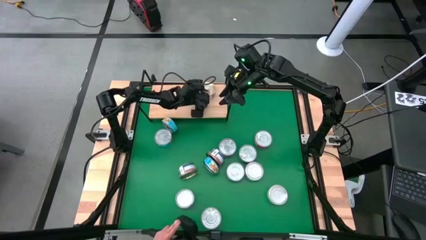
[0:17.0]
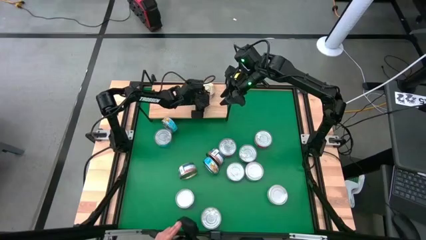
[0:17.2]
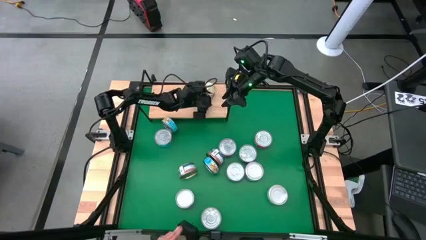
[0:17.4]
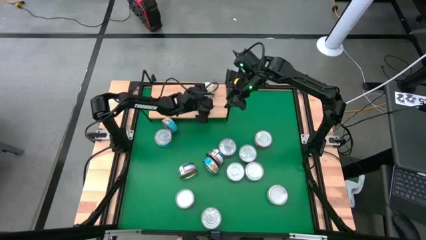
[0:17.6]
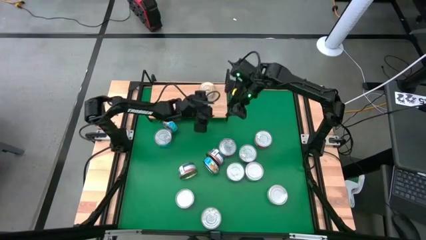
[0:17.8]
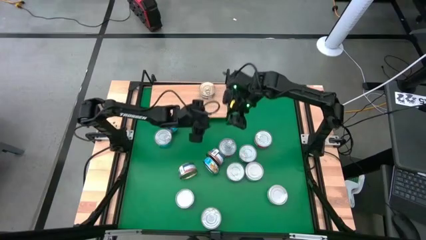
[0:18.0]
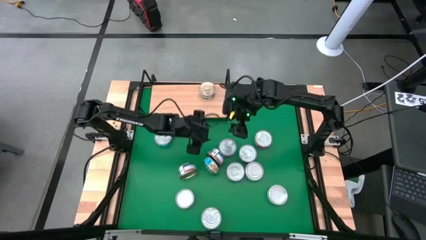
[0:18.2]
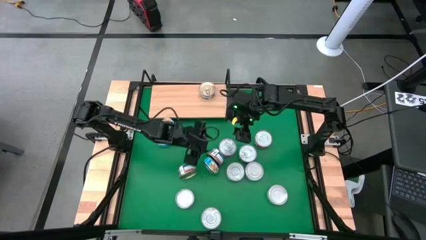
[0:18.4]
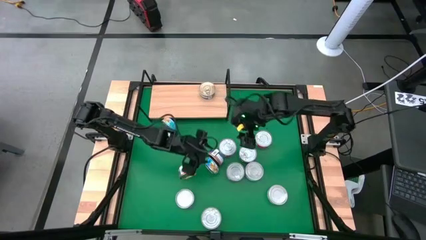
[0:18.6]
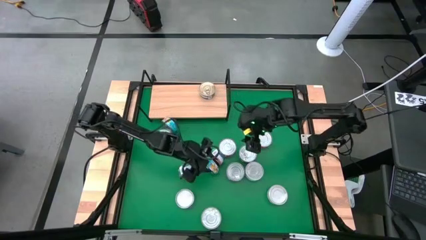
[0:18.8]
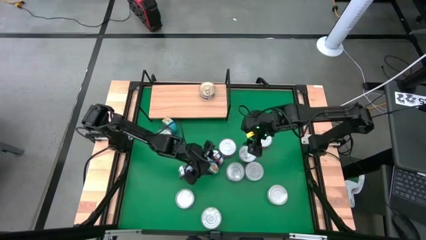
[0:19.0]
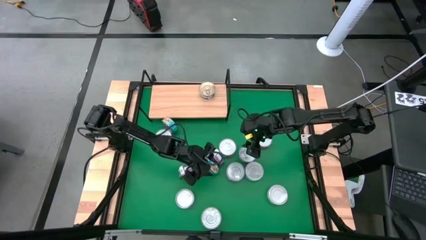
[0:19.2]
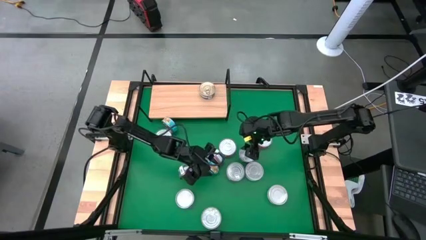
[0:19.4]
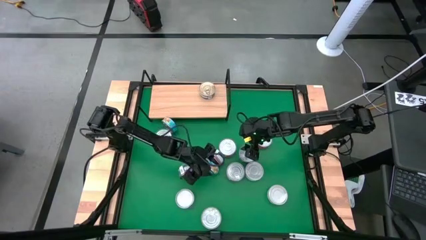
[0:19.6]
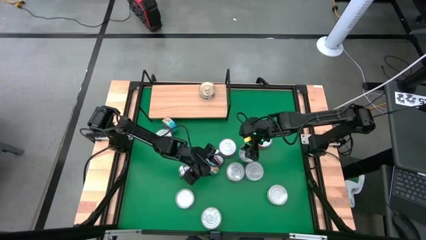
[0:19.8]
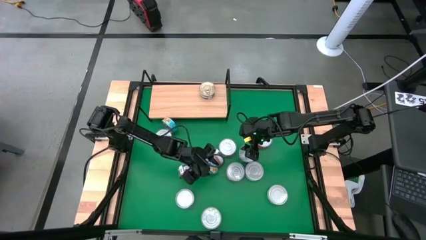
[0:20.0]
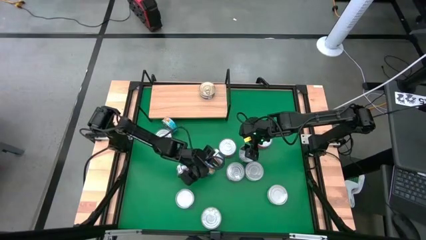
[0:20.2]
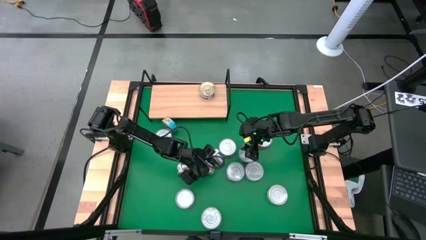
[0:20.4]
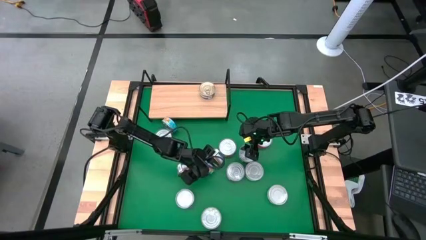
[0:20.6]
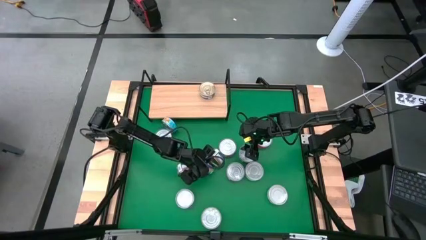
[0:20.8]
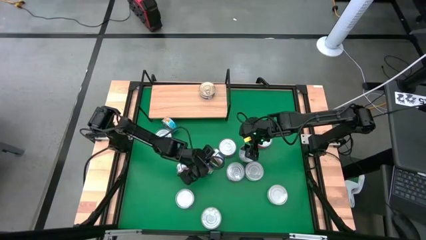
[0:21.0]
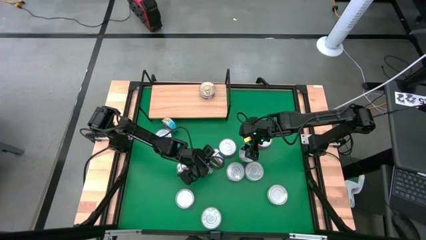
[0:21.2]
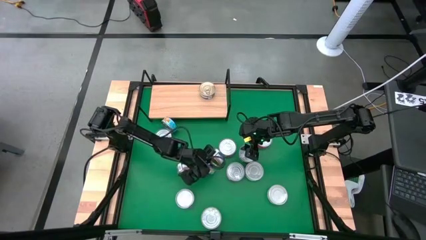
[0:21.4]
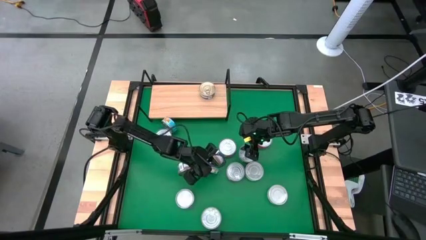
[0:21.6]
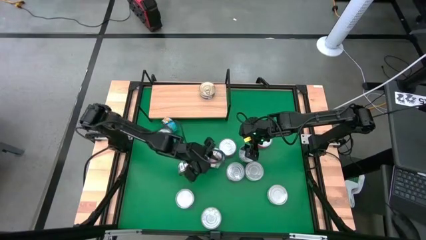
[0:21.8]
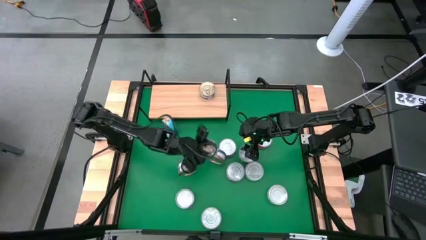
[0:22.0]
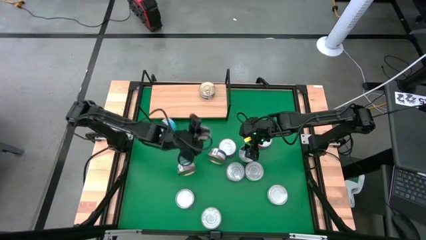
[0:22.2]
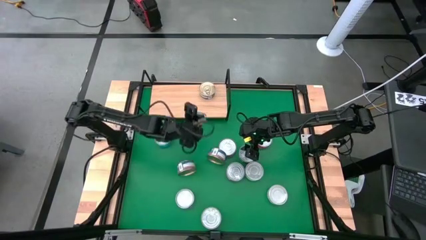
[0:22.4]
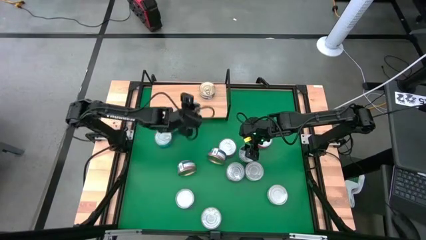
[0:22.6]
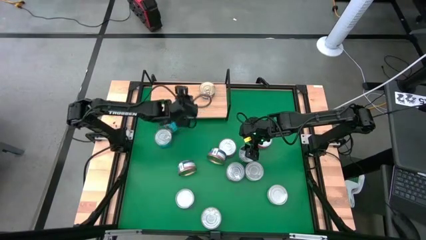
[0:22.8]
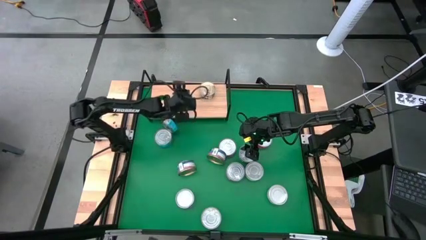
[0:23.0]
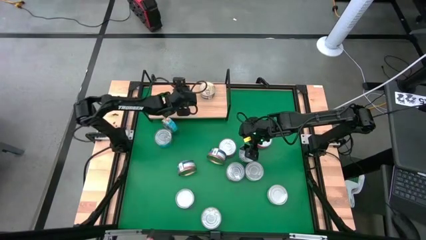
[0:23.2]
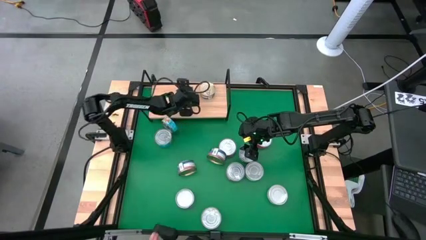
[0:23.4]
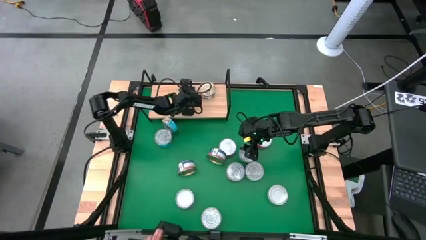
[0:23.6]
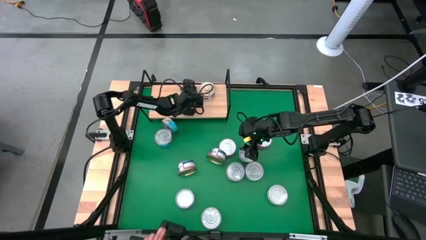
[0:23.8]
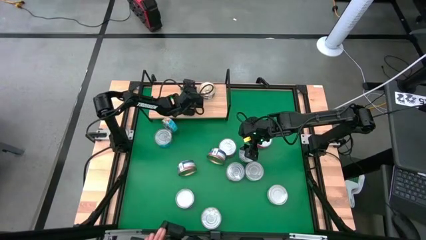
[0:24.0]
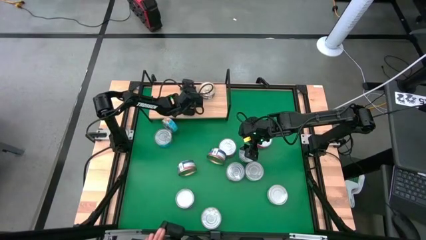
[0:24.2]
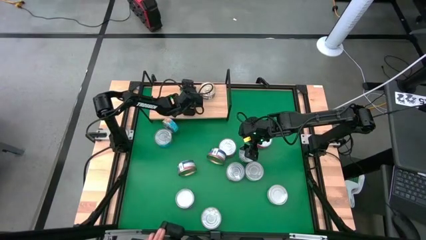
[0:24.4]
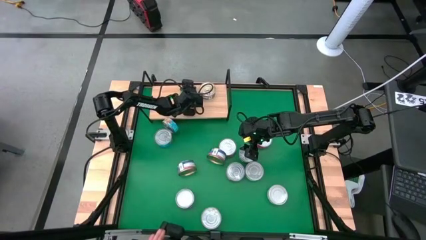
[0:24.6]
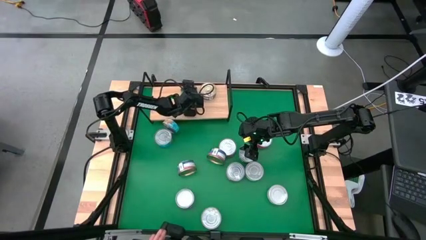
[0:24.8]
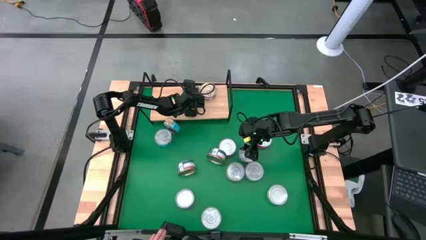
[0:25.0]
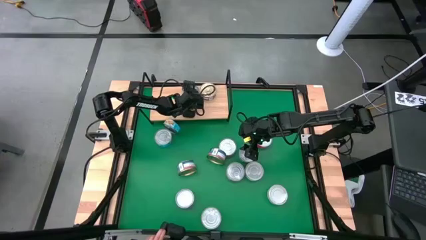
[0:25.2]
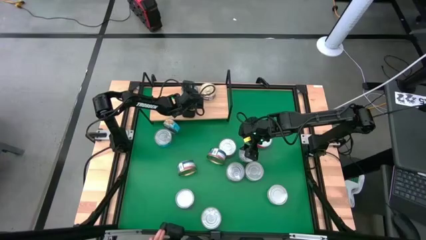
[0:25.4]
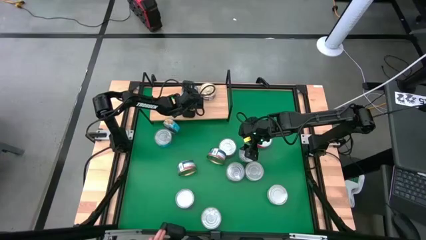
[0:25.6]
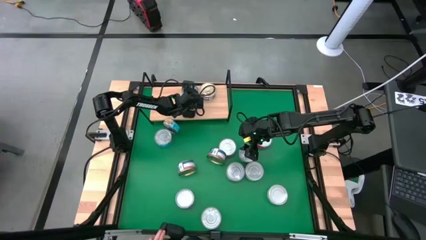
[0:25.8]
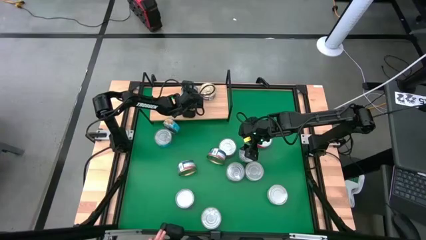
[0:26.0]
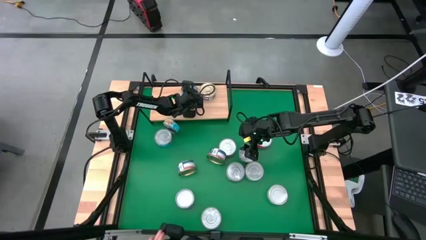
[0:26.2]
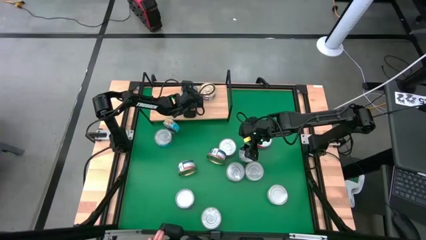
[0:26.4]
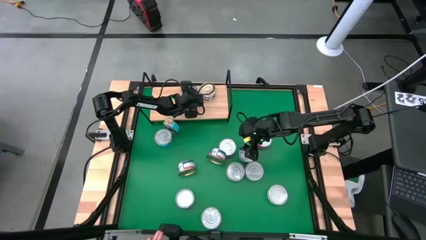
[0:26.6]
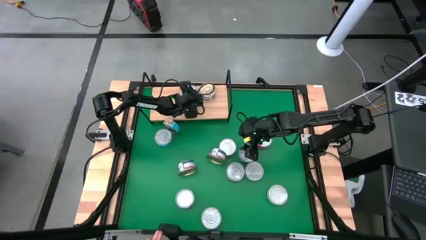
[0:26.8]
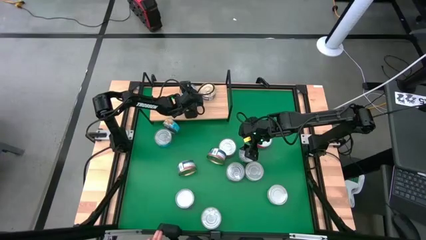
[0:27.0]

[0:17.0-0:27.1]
Task: Stack canned seafood by type on shelf
Put the yellow blue tuna can on the shelf

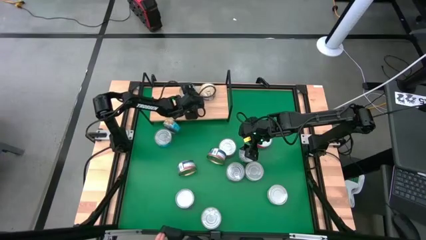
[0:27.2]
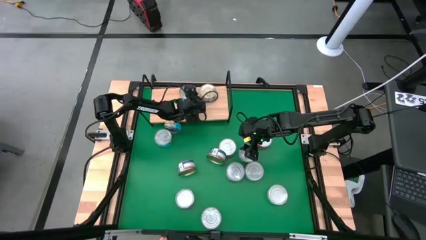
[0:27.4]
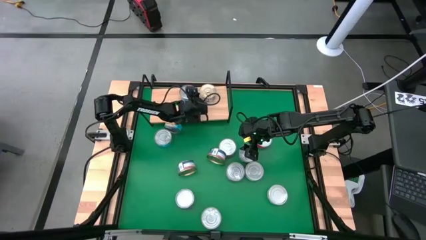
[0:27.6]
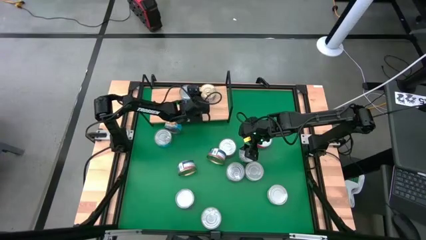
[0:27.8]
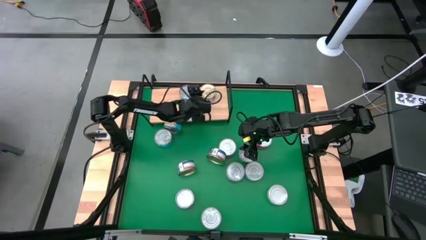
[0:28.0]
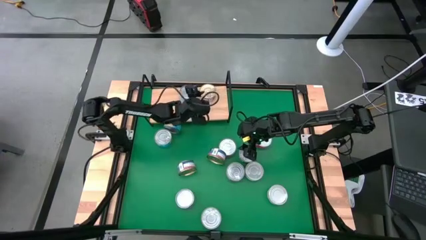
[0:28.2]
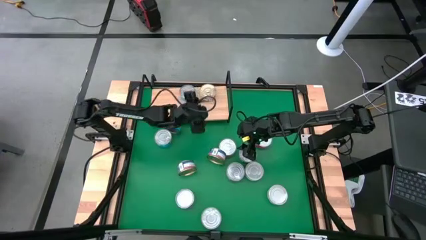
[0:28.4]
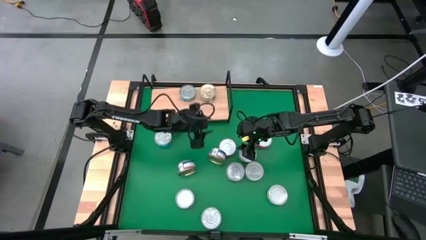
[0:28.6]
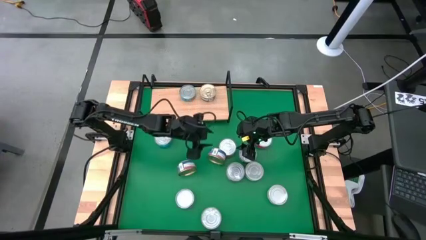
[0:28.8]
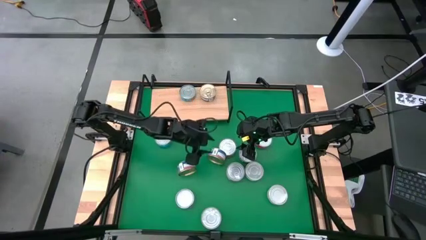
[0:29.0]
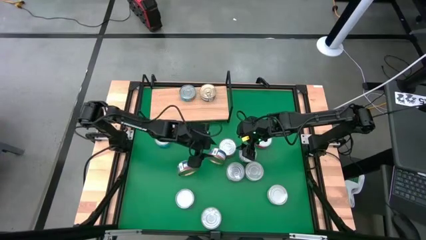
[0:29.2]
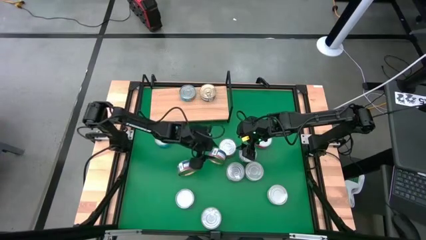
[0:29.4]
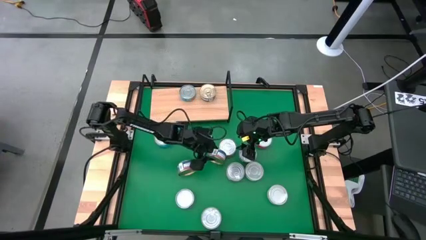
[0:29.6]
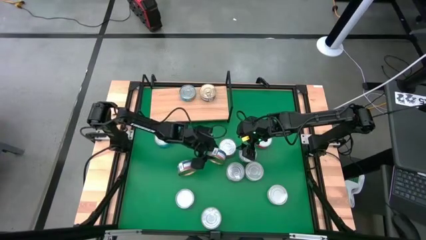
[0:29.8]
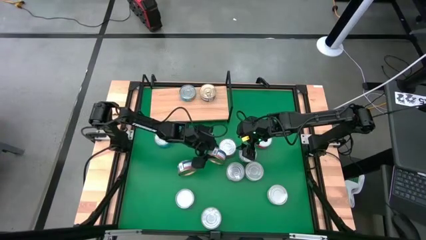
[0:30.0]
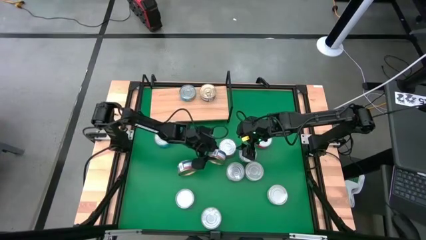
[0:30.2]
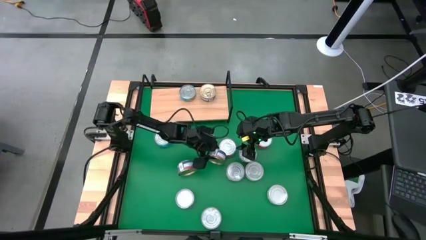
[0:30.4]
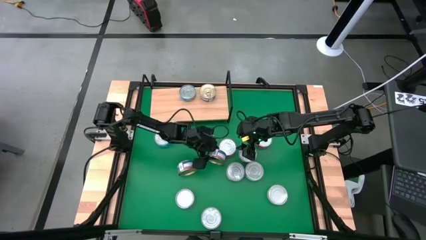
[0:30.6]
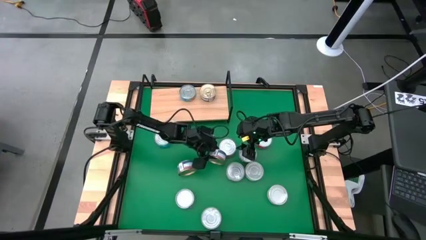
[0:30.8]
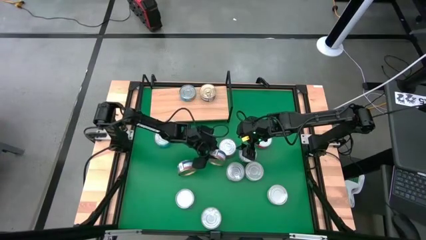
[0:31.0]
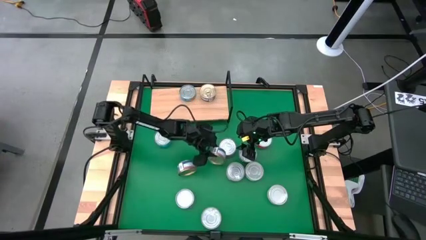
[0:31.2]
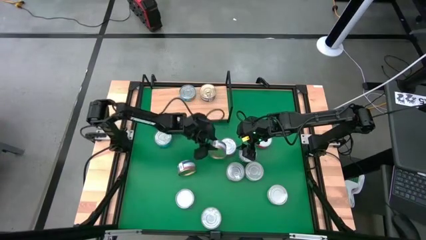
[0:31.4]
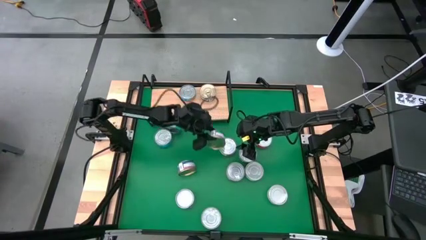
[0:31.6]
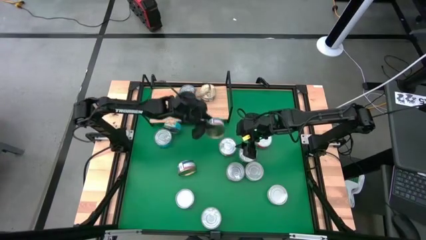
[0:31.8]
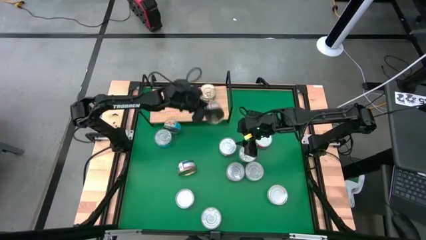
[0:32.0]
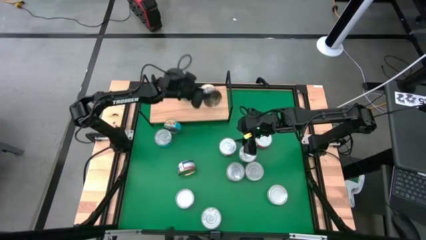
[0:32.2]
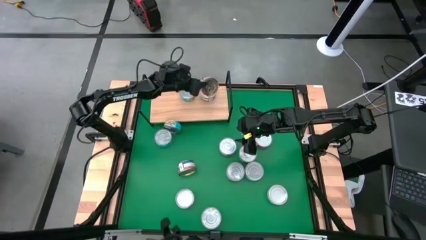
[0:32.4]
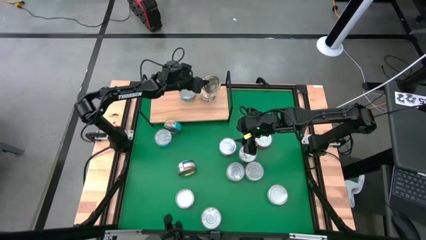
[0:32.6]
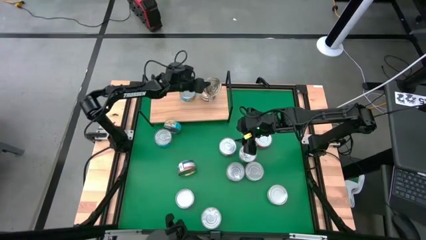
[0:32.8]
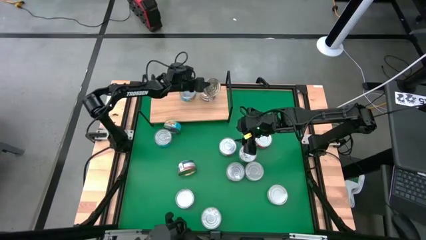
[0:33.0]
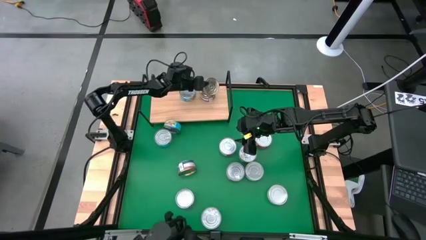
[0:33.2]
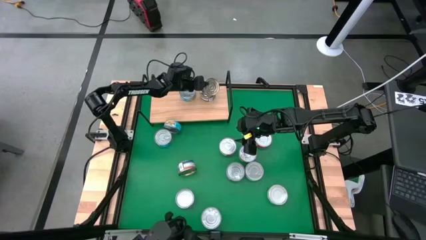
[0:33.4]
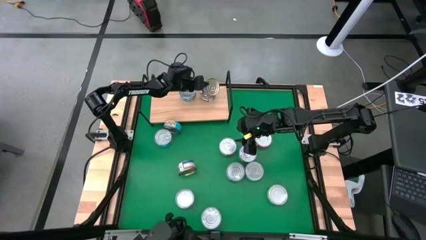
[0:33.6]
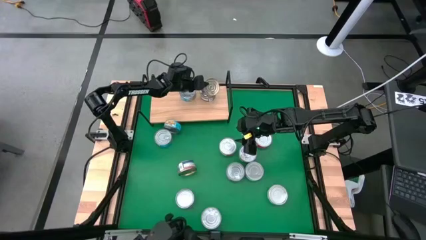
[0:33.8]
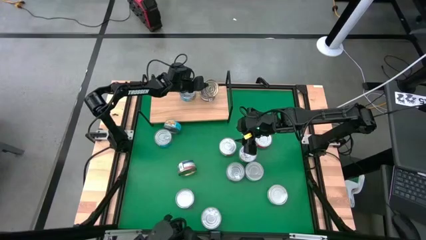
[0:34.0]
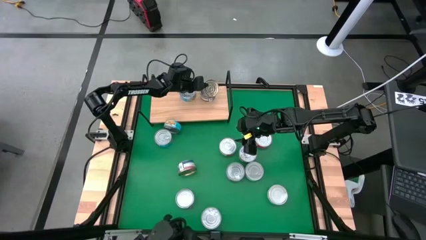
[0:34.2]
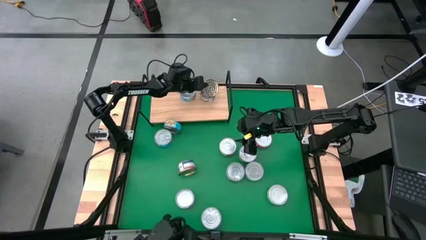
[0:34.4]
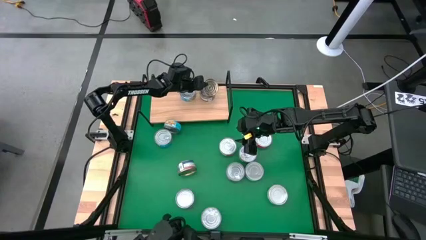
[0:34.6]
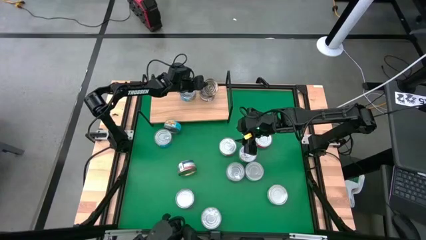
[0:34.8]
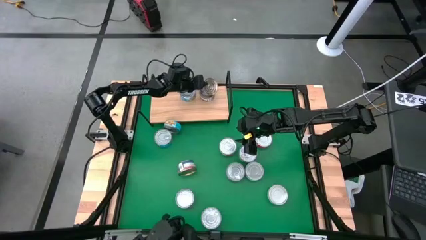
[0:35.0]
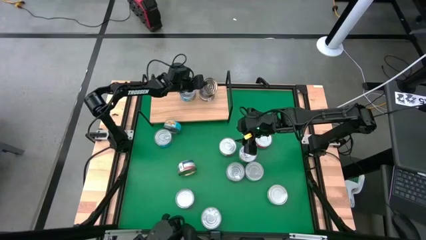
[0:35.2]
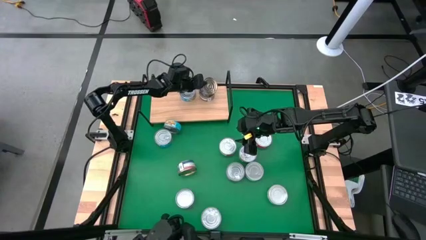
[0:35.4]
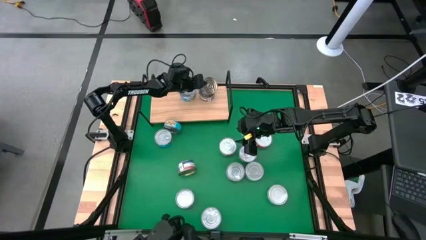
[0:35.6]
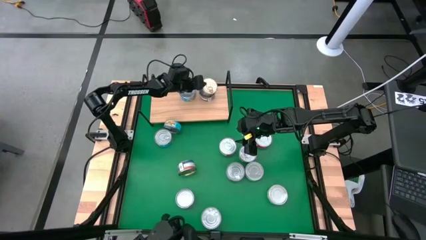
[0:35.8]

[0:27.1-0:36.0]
Stack the blue pink tuna can on top of the other blue pink tuna can on the shelf
